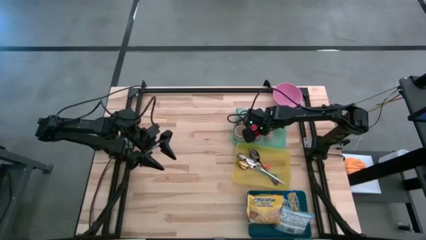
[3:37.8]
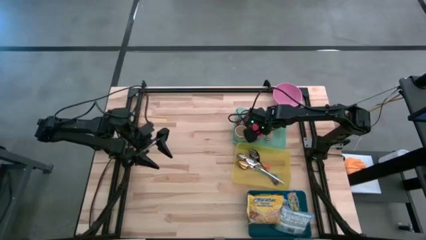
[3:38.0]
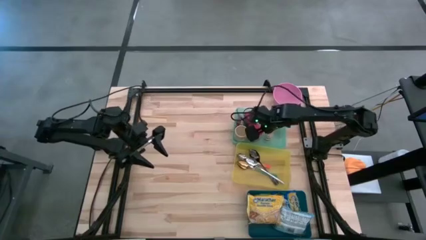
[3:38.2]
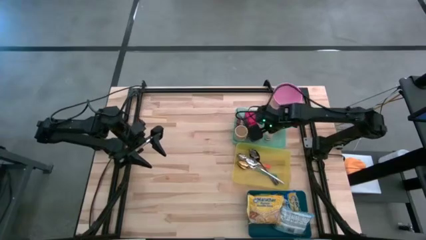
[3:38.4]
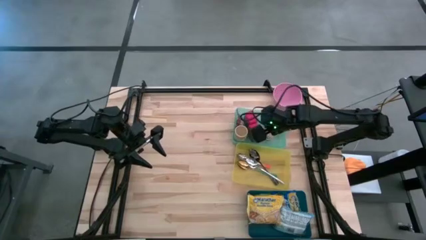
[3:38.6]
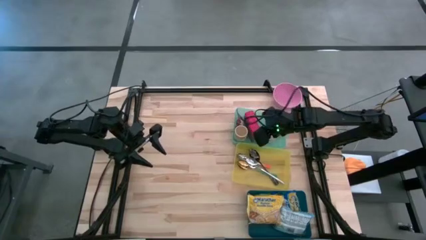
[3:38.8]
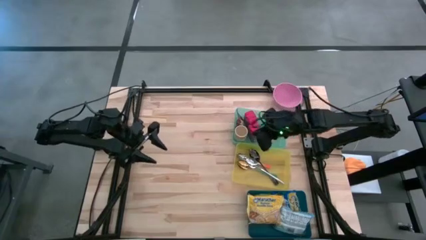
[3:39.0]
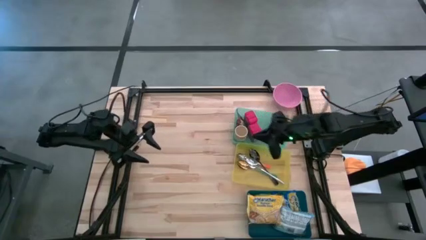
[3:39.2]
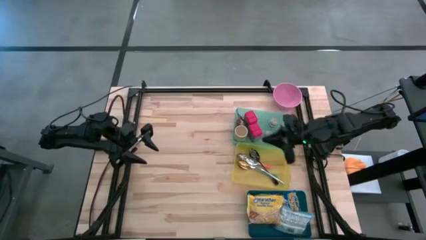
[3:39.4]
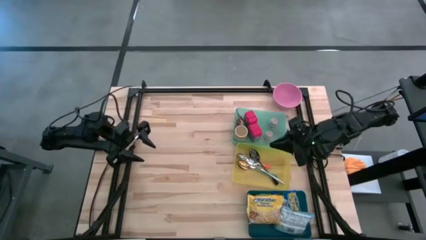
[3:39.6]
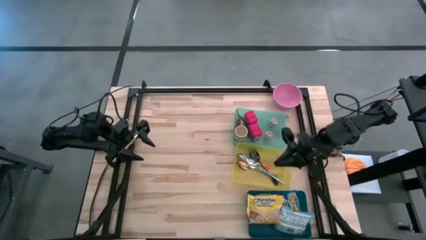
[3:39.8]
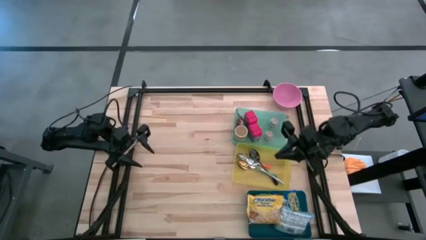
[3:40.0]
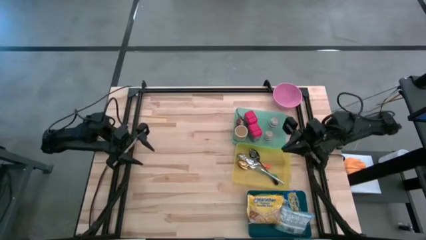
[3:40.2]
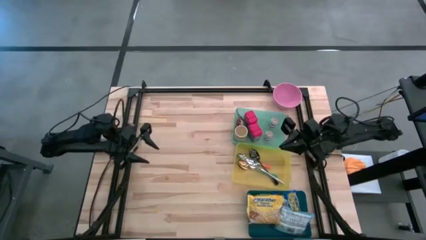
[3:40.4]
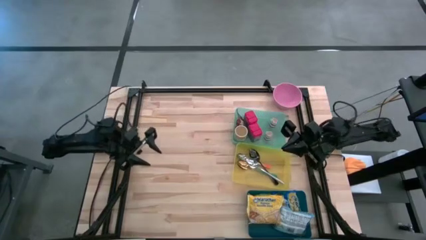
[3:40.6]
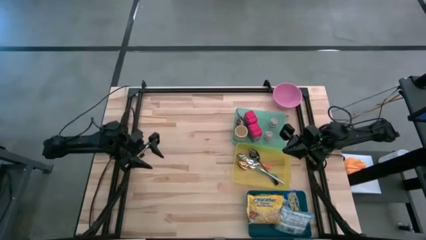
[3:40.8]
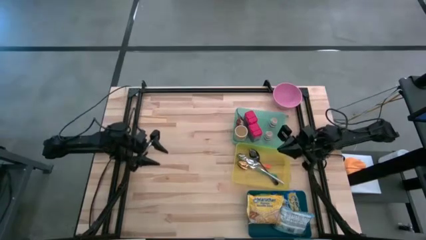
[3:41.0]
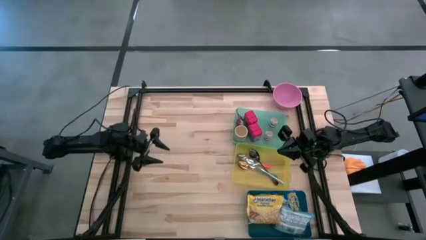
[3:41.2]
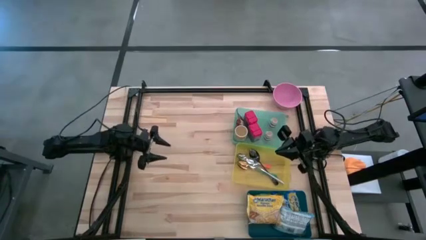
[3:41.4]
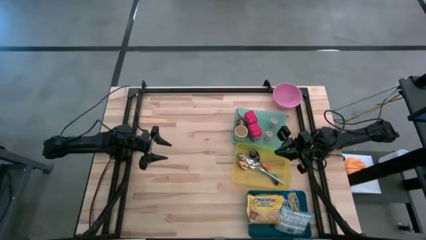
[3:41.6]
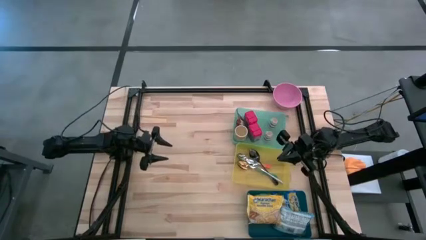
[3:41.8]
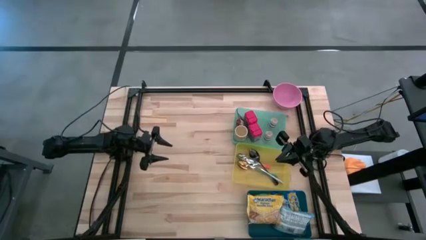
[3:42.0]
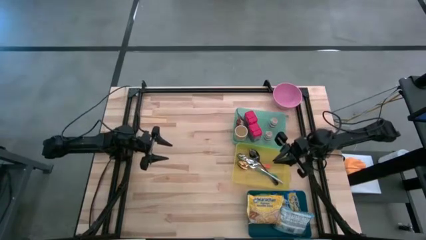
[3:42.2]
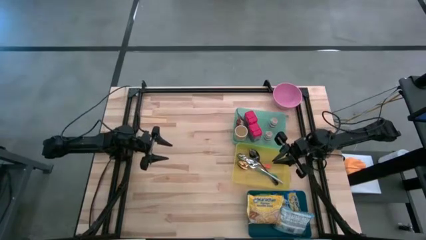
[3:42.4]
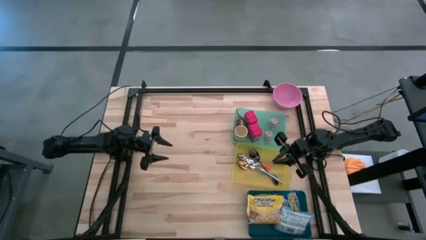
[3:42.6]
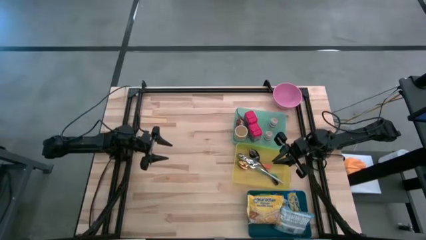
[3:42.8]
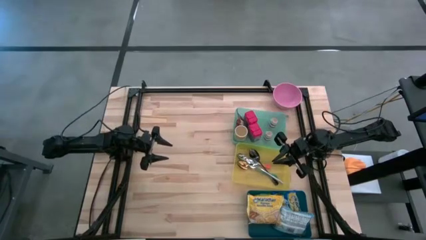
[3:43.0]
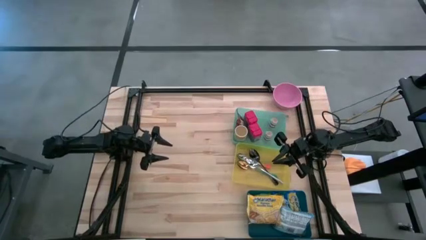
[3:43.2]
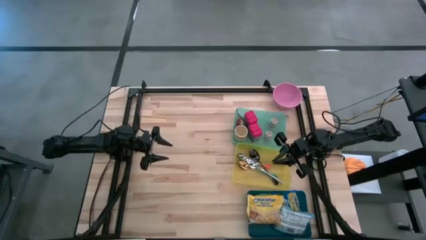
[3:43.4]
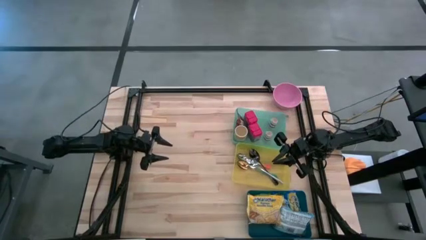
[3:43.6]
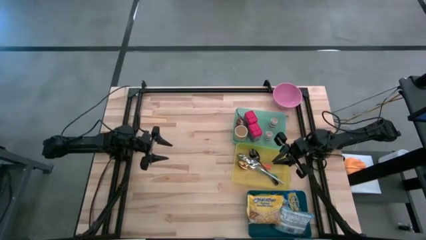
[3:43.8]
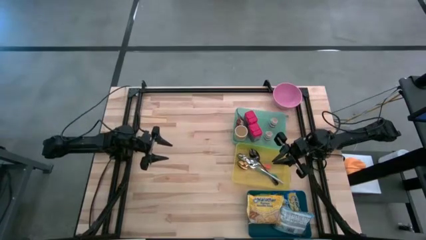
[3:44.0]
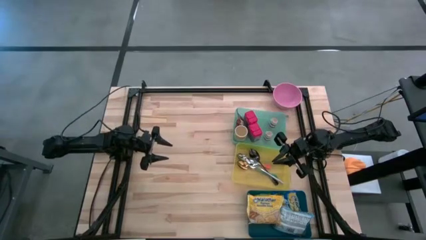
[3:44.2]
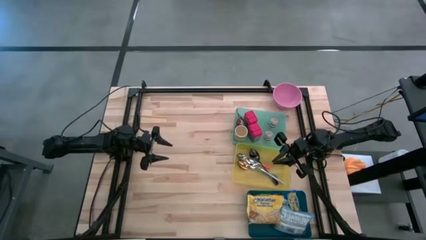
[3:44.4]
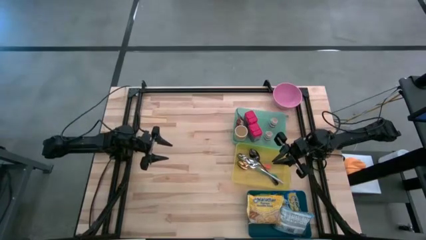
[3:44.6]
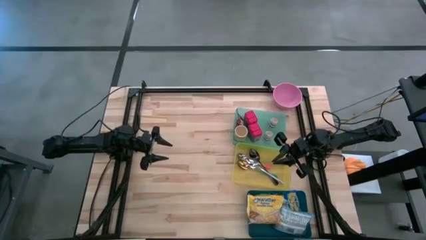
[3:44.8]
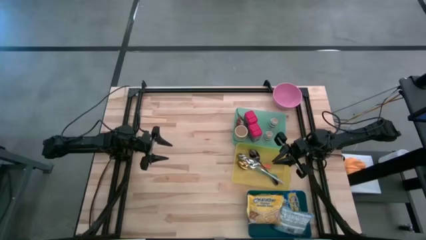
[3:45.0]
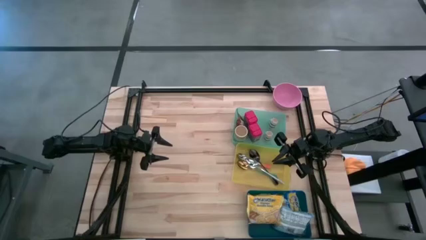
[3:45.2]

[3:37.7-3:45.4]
Return to Home Position
